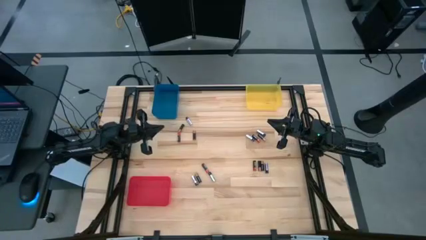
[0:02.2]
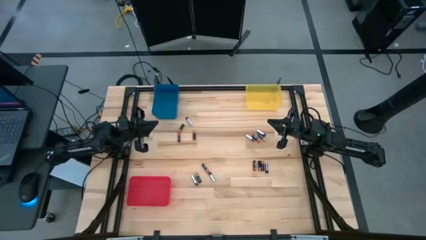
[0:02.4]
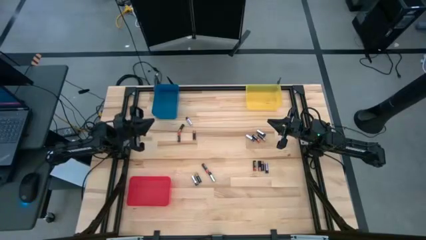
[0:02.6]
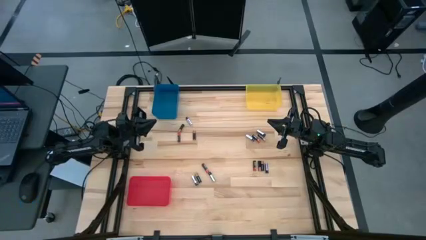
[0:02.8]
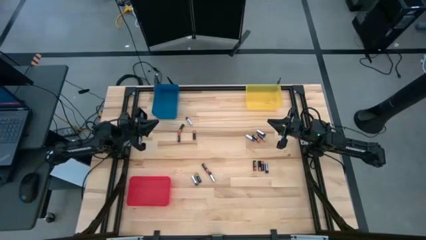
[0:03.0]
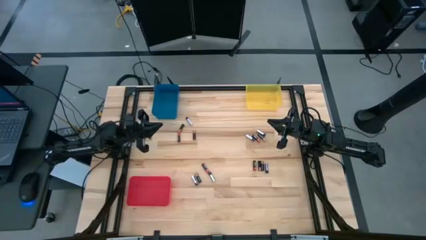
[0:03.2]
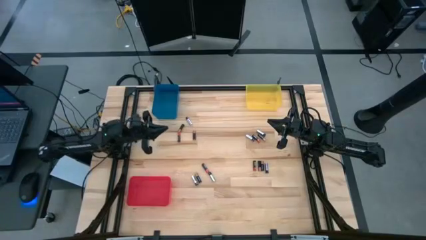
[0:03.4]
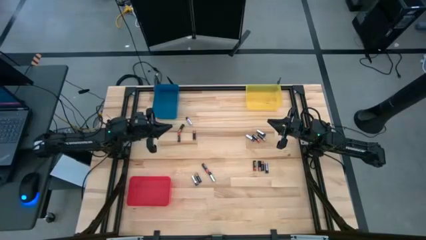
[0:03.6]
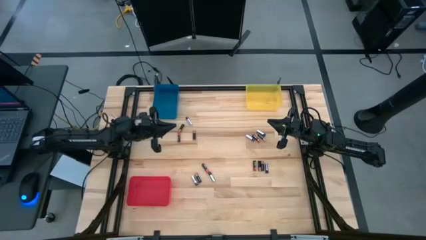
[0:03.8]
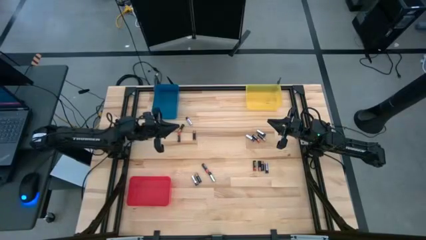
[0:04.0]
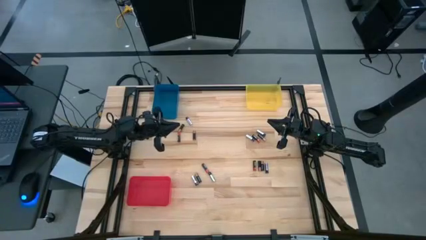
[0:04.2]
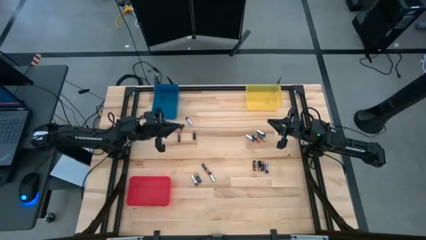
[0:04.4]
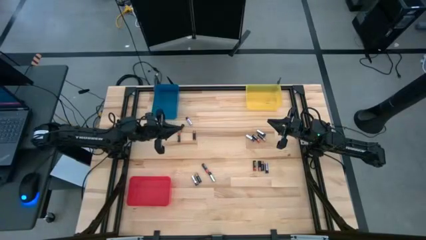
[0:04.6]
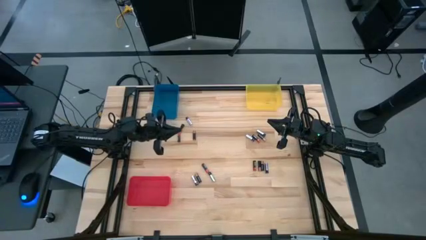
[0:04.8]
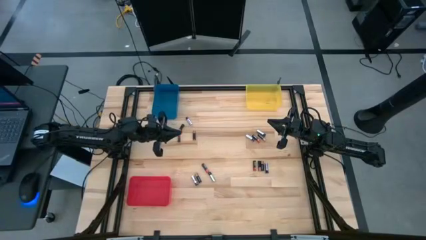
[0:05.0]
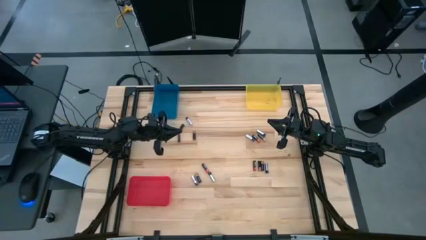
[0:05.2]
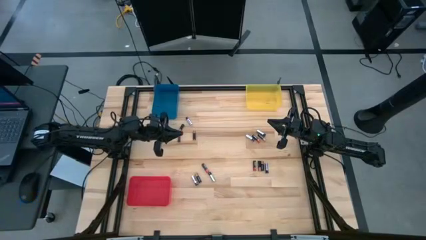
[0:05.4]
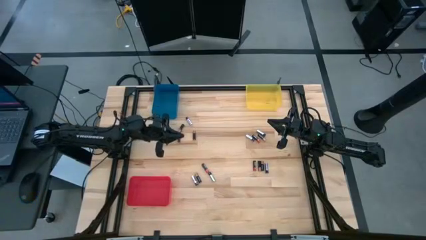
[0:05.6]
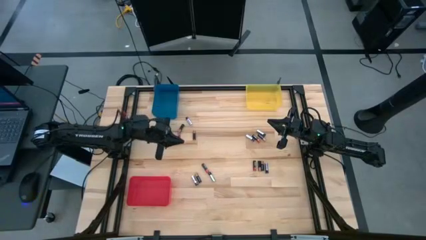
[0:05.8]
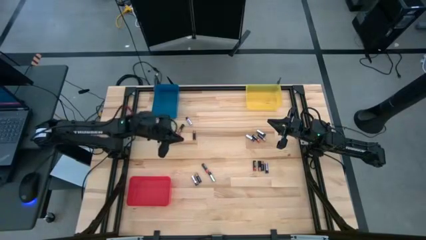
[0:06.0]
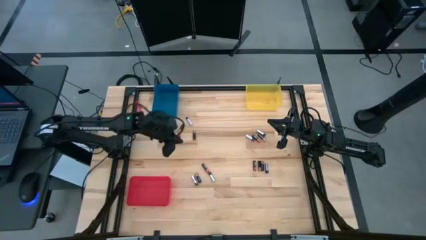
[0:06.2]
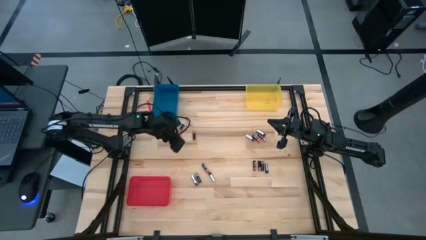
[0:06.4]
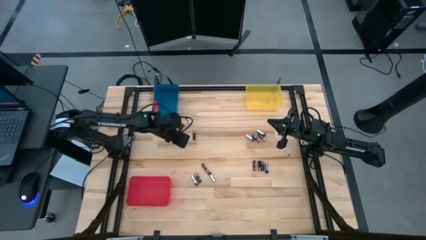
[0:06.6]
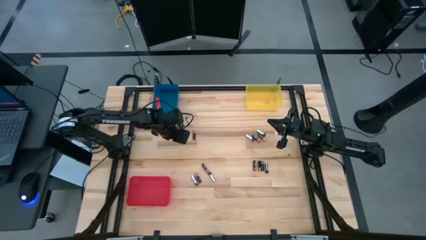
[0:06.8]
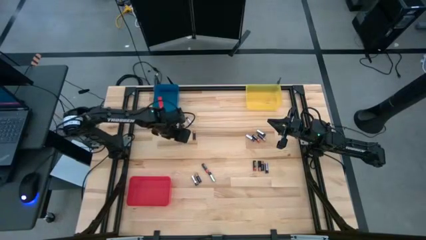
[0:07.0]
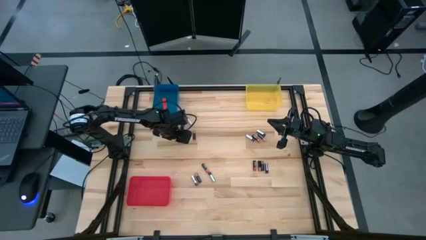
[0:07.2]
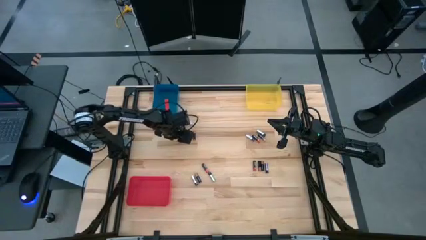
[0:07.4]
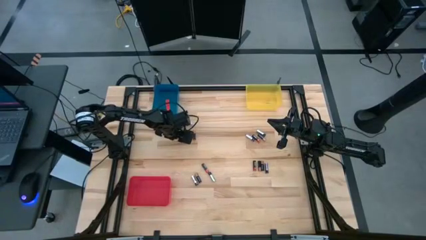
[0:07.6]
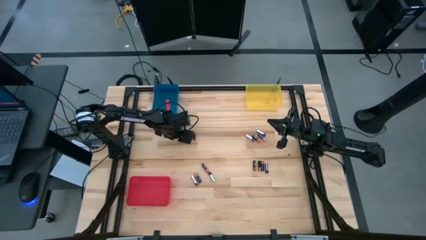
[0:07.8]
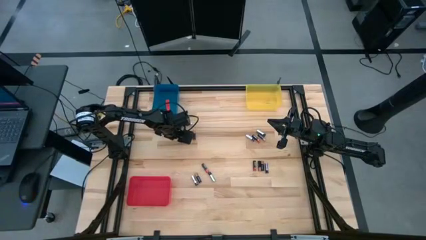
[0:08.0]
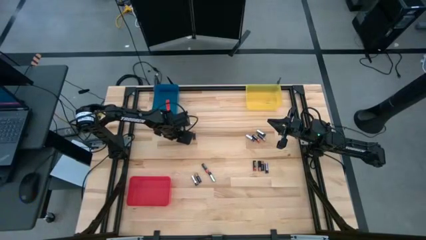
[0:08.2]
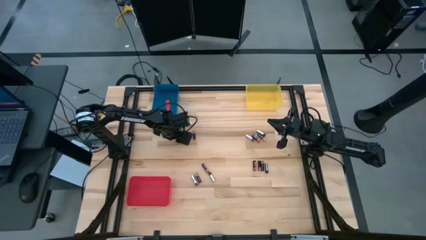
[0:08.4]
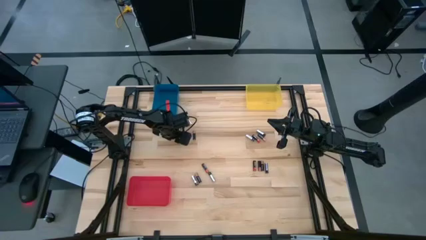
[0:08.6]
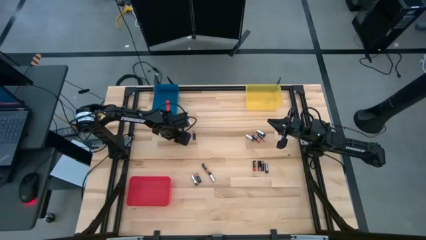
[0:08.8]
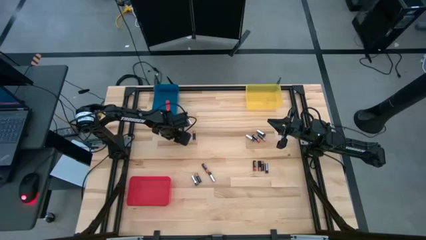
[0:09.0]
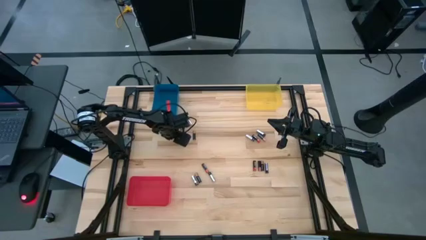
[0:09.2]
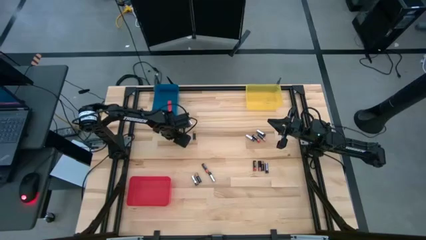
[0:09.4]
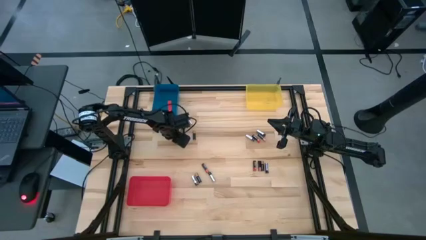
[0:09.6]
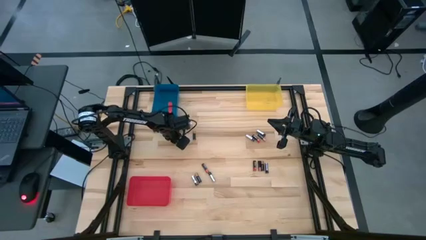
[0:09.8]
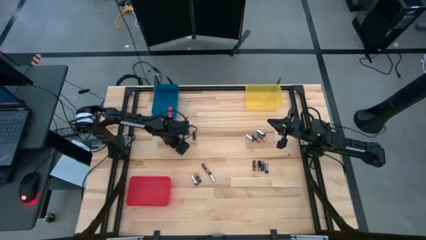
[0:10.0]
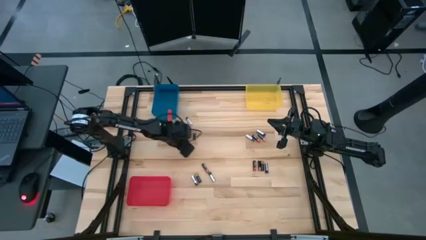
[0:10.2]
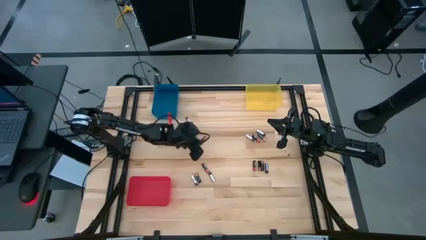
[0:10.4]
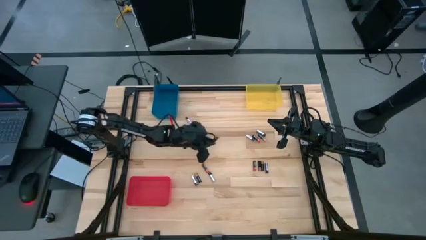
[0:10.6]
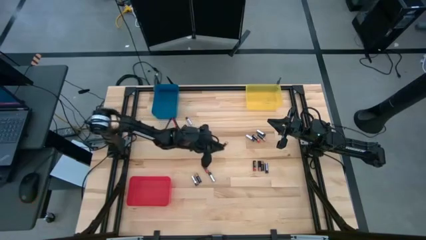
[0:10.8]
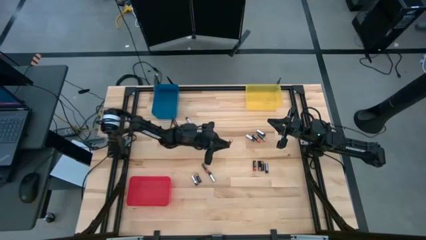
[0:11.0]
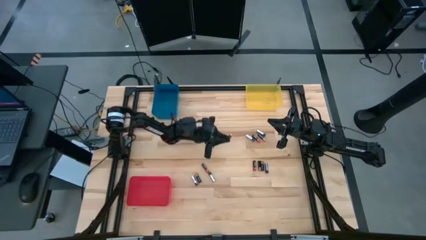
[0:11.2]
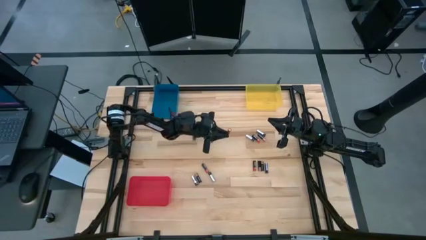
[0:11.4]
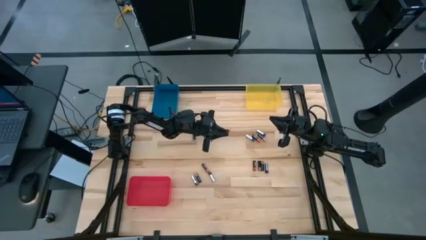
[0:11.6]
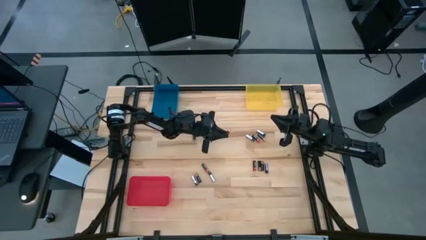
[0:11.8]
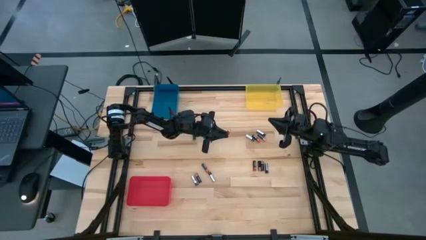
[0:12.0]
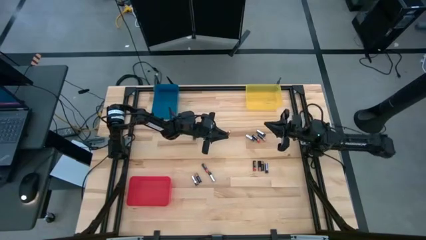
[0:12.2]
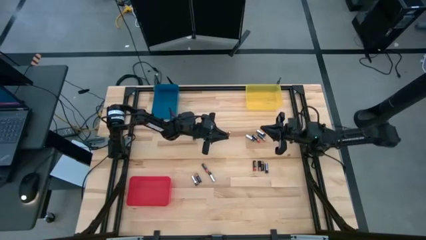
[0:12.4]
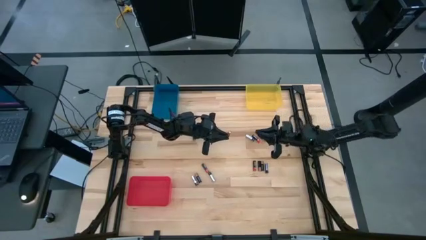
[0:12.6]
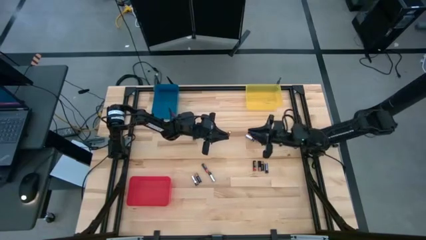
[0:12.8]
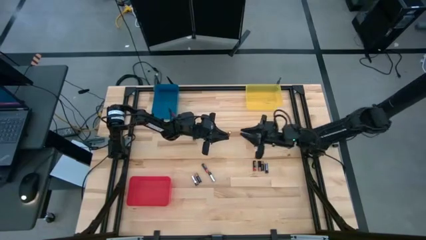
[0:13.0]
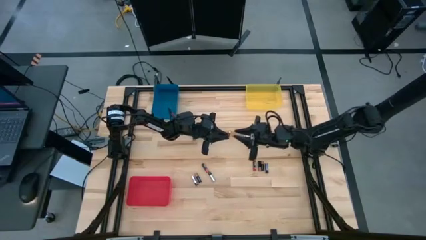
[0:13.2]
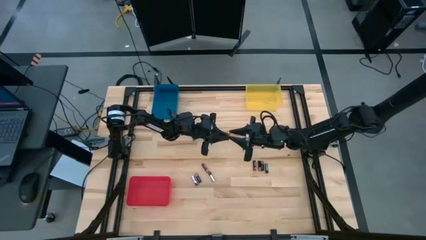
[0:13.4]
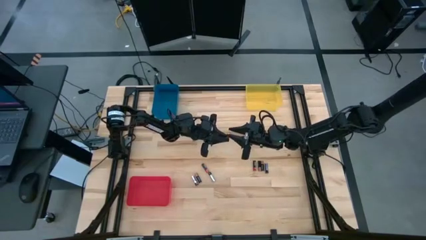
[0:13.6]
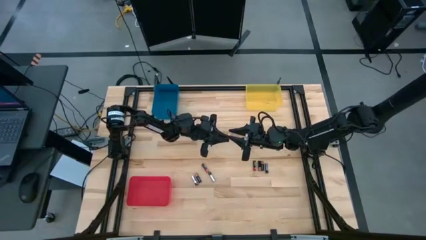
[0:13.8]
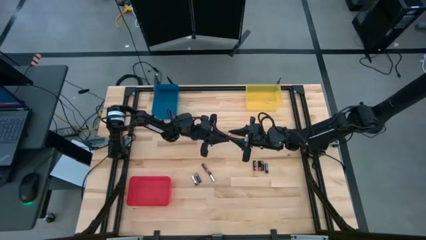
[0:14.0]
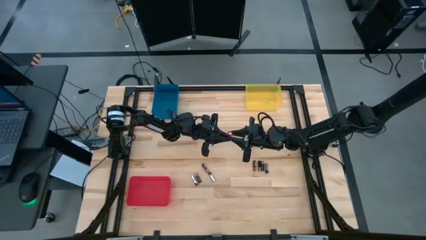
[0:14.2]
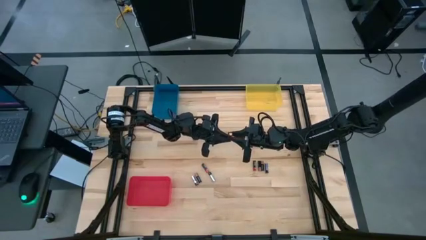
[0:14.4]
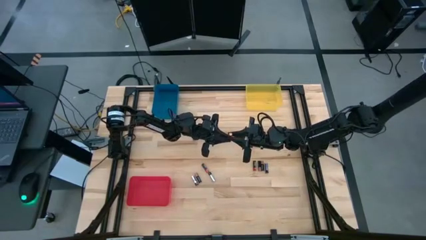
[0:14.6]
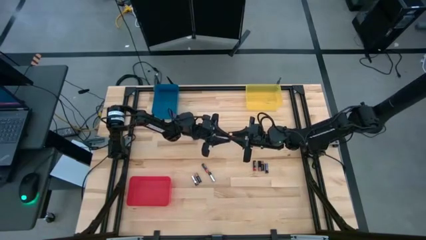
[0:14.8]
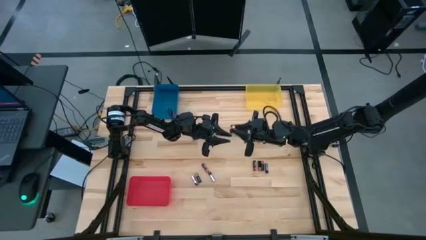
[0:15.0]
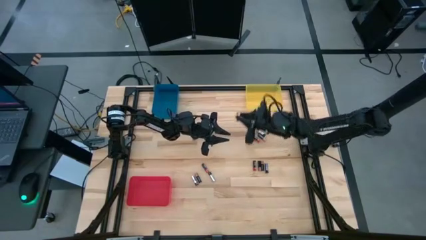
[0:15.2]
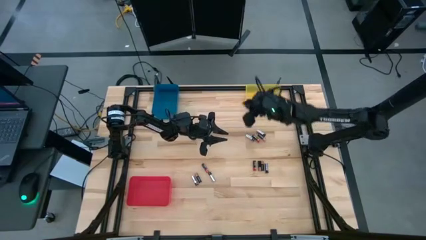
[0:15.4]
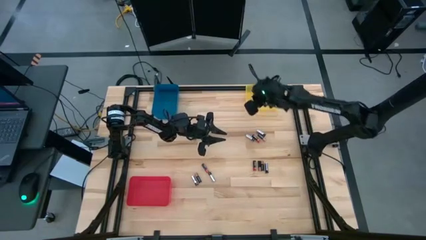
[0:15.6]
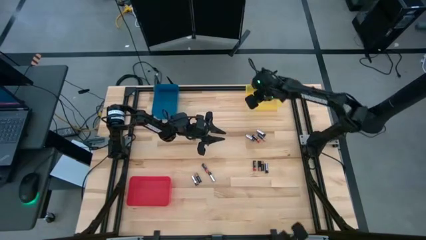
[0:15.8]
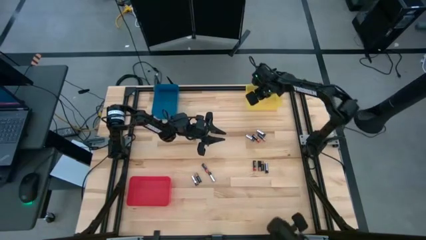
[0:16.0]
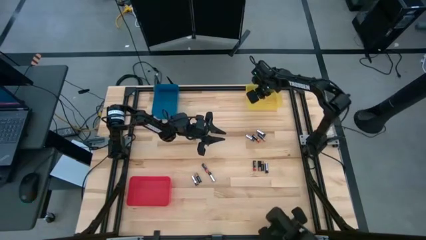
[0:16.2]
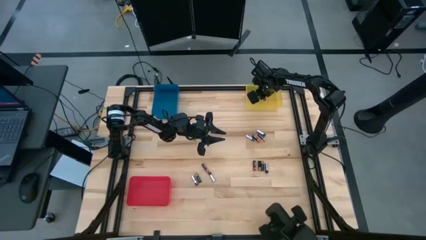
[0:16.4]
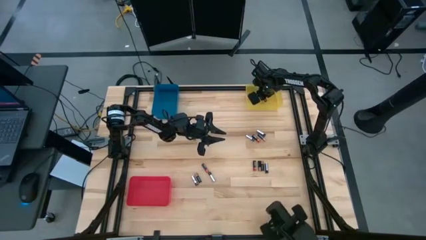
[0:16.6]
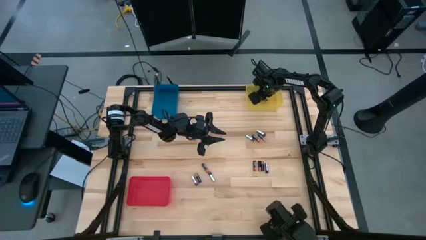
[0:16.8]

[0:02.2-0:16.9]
Task: Sort batteries
Put the red battery into the yellow bin
